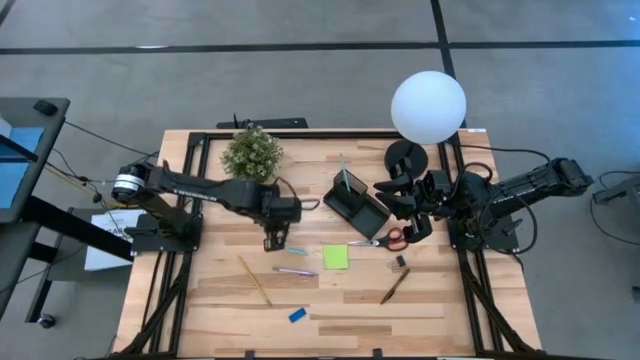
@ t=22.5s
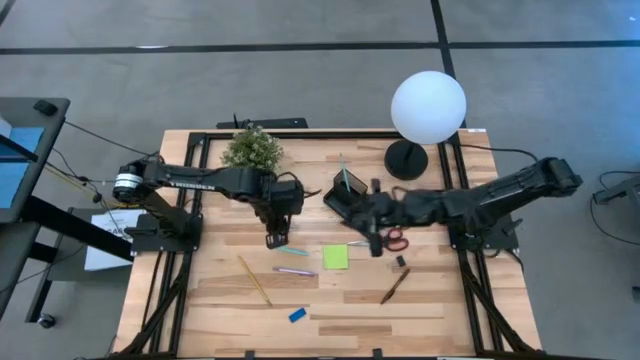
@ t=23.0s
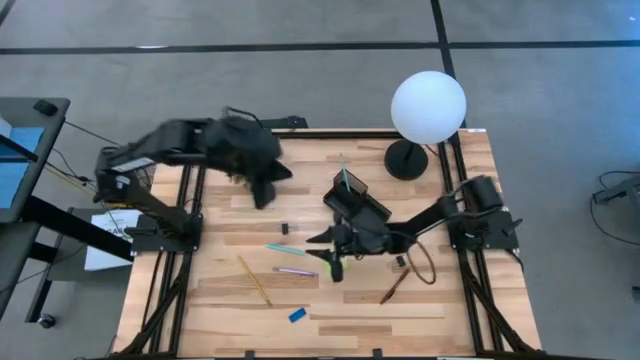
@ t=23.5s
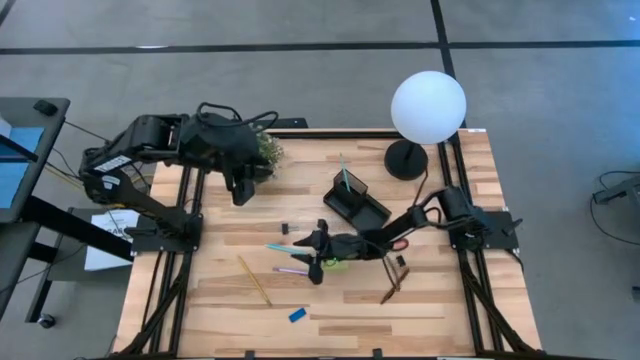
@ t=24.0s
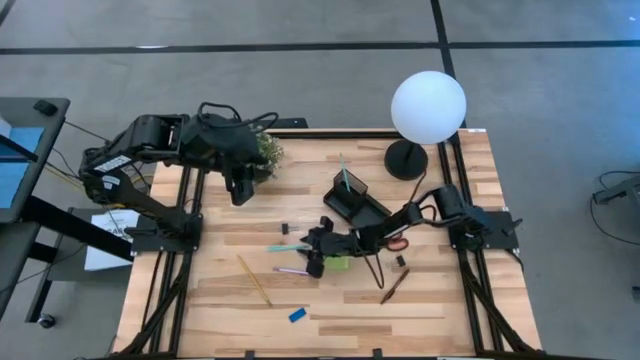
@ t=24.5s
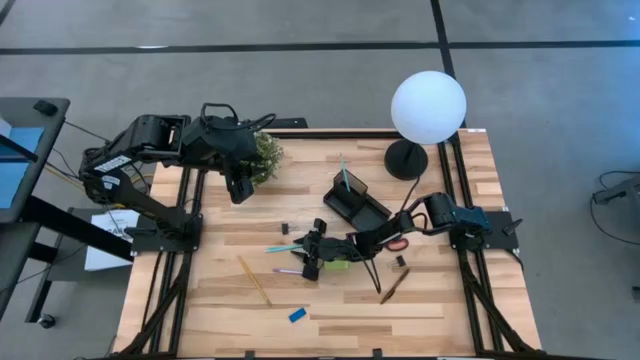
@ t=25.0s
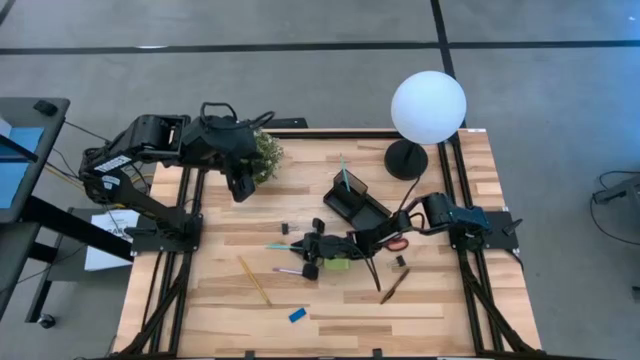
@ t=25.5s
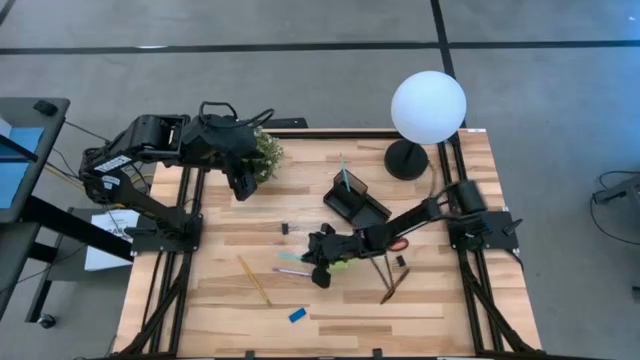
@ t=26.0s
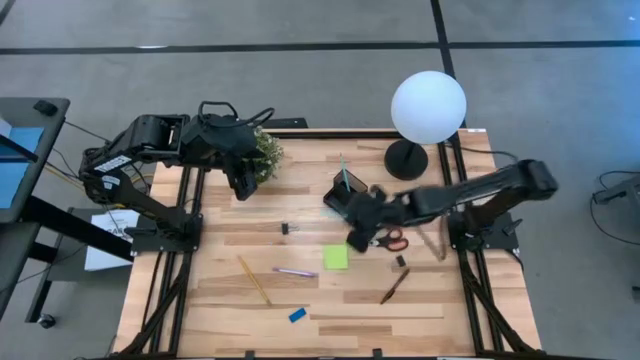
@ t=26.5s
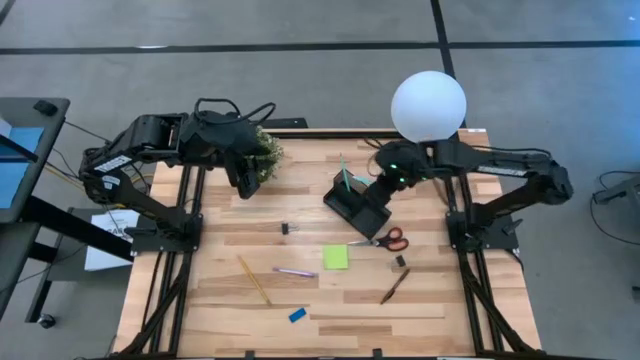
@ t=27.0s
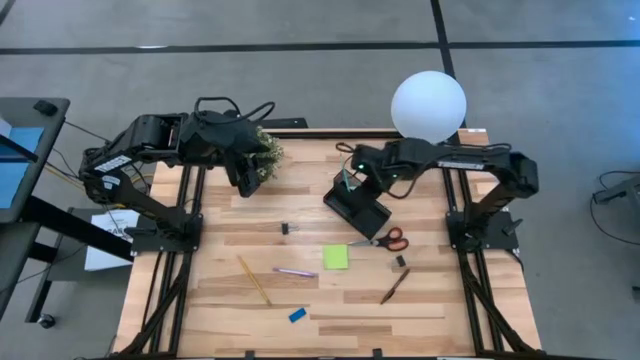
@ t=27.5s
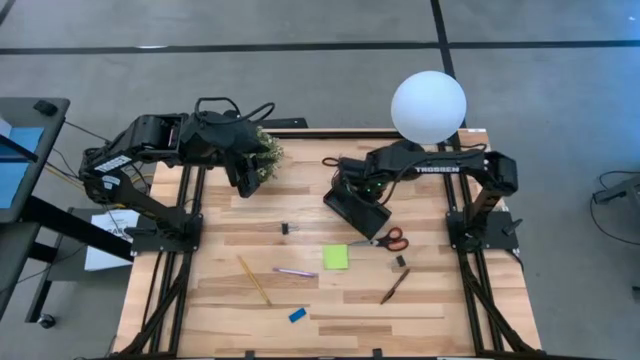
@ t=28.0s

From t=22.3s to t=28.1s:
Task: Pick and place office supplies into organizer
Put the blue pen into the black desk organizer

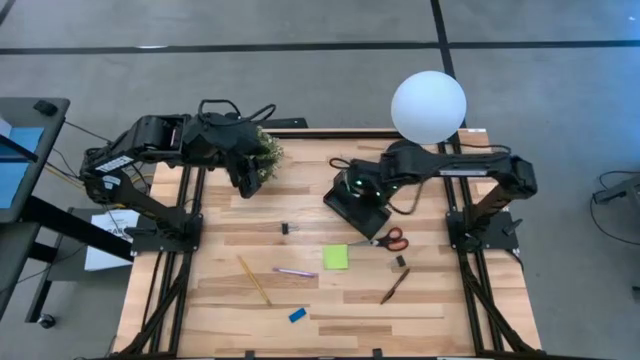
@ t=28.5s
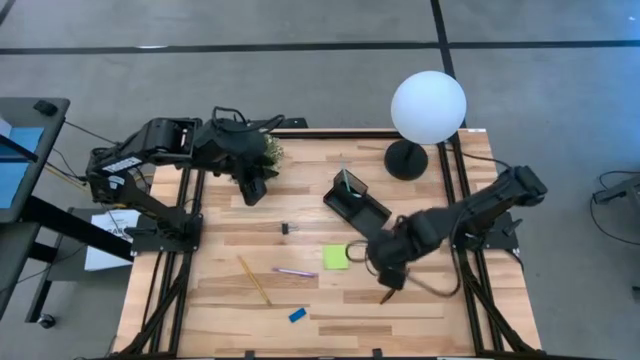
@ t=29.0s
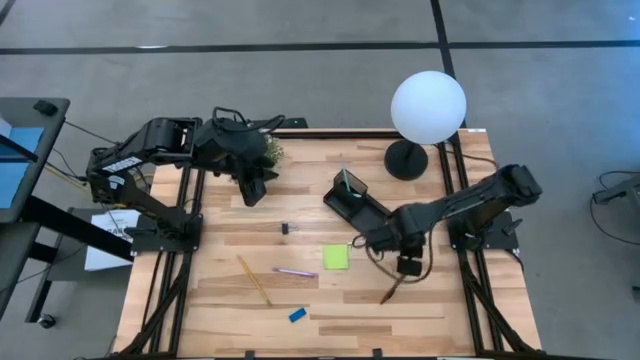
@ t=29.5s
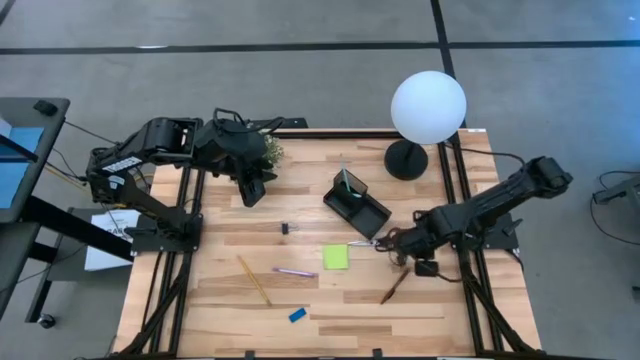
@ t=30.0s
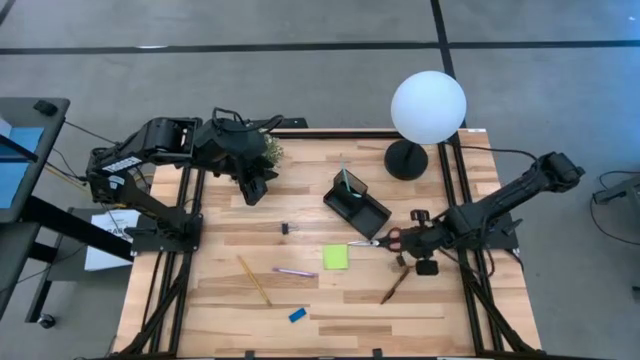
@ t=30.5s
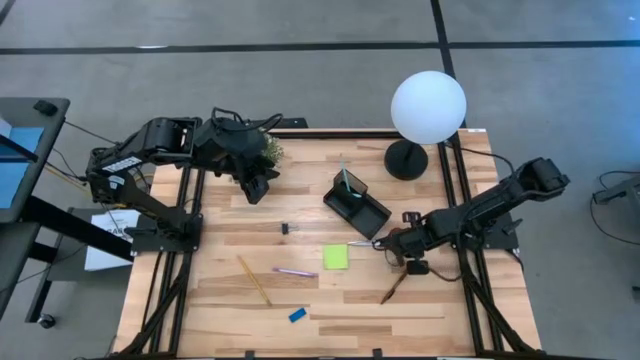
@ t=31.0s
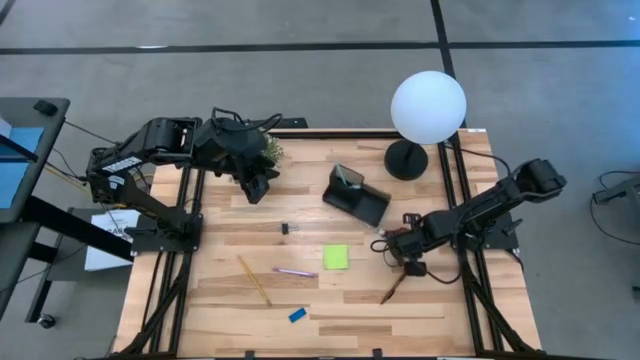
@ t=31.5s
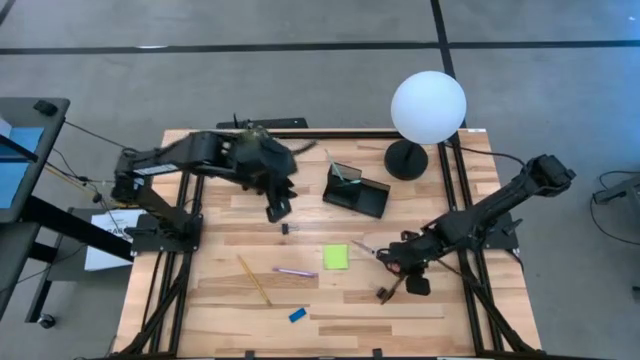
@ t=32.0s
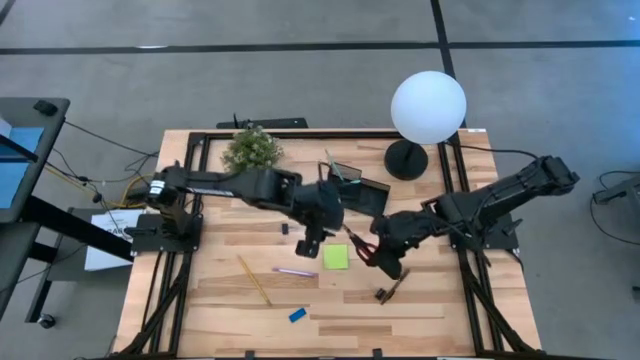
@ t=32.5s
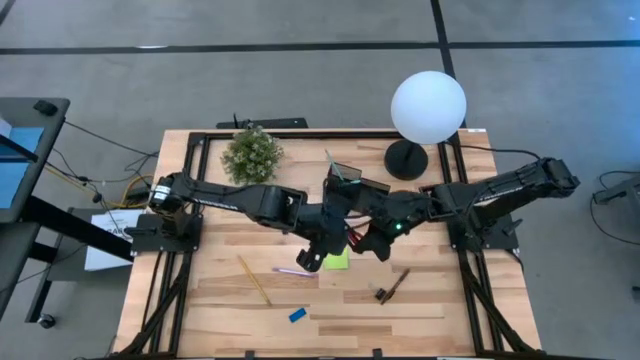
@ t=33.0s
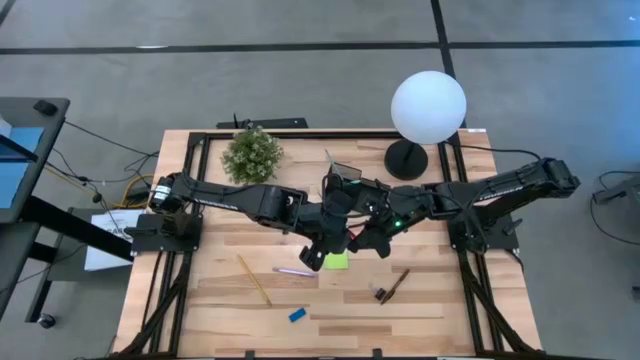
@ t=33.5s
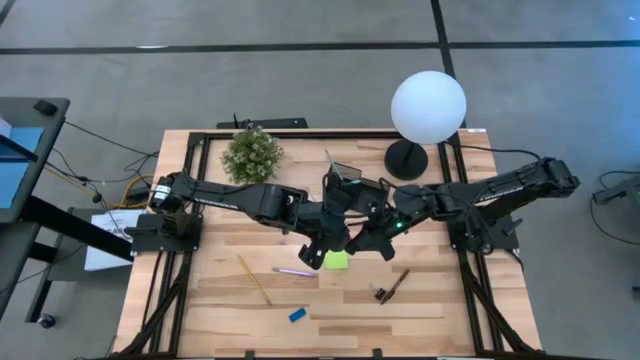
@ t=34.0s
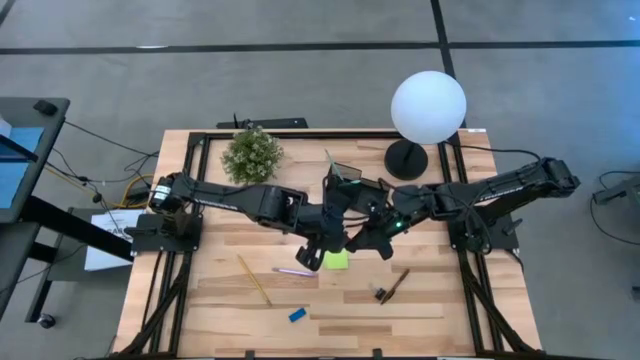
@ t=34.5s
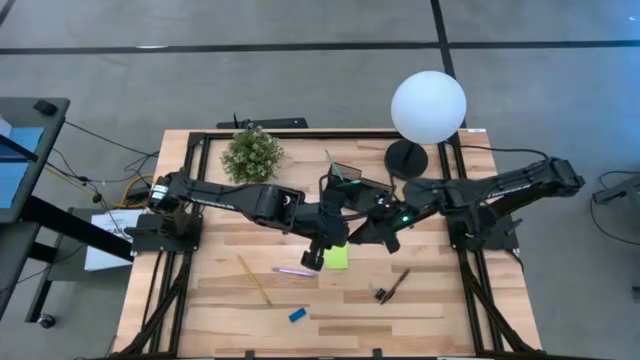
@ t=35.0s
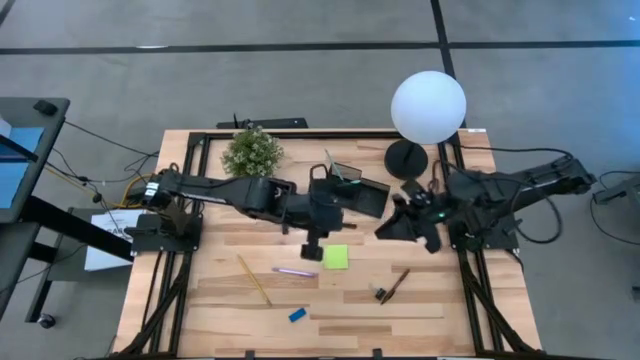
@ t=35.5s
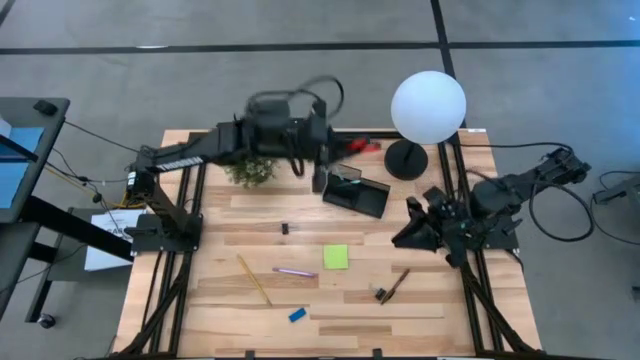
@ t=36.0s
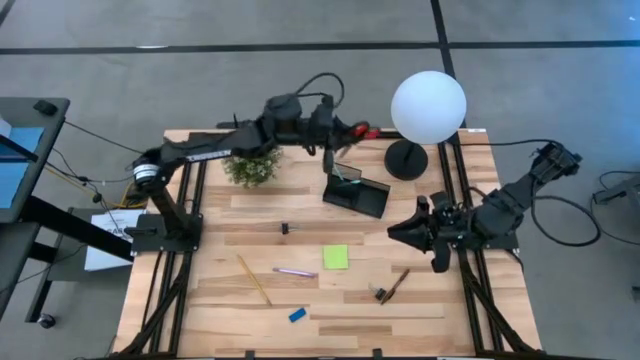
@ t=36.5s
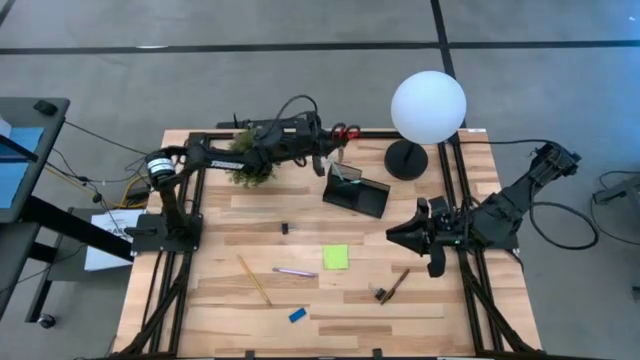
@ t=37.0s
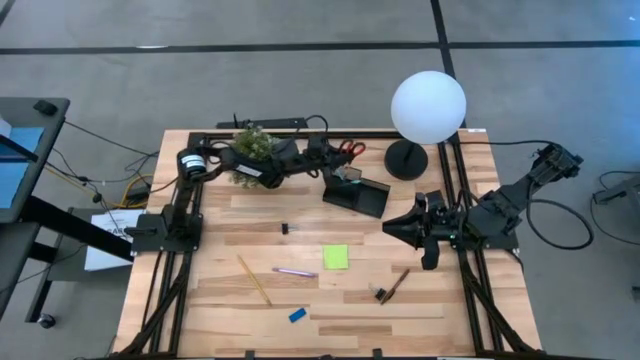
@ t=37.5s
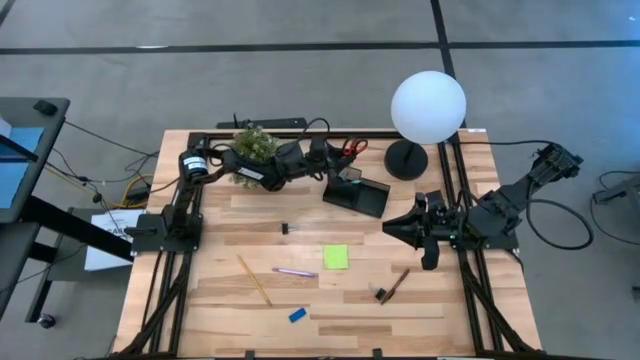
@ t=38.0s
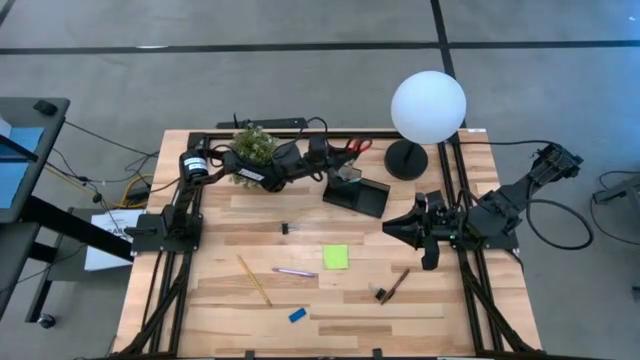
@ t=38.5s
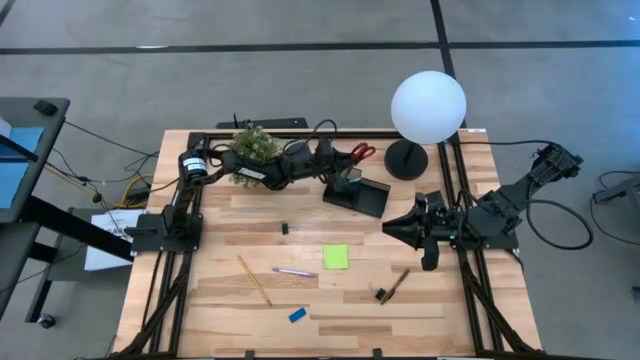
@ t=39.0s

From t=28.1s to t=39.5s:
Put the black scissors into the black desk organizer

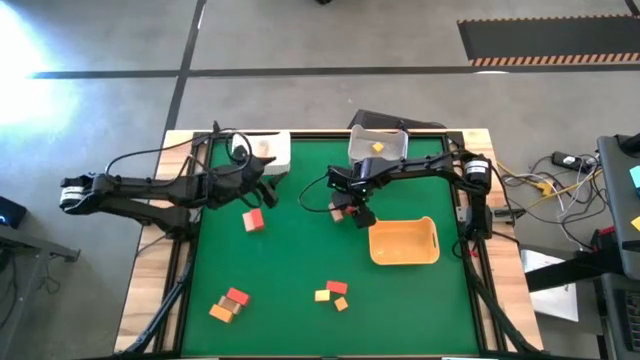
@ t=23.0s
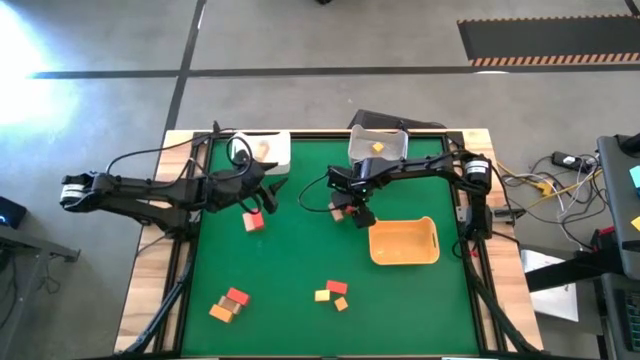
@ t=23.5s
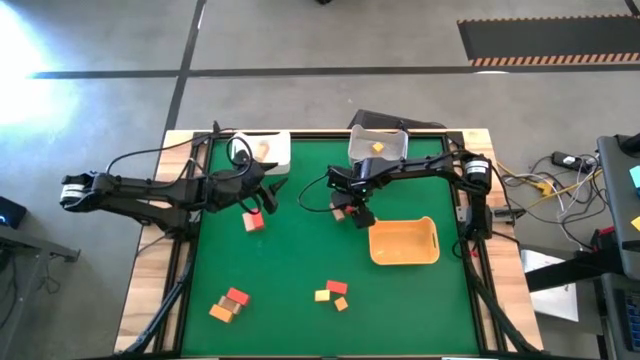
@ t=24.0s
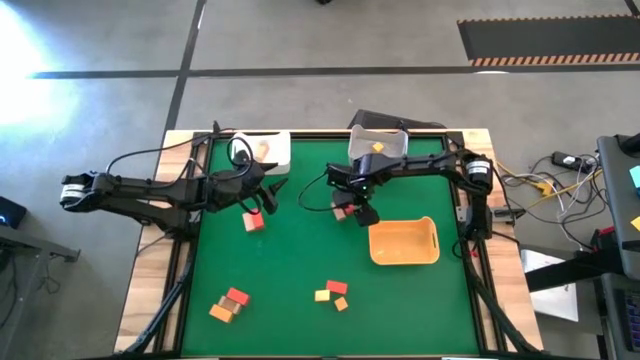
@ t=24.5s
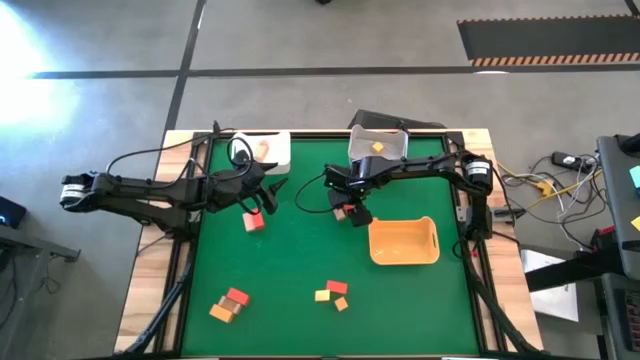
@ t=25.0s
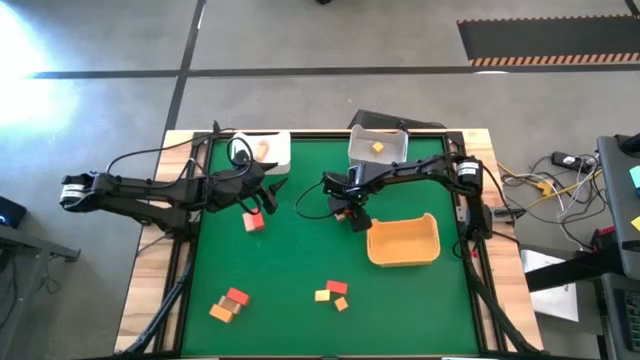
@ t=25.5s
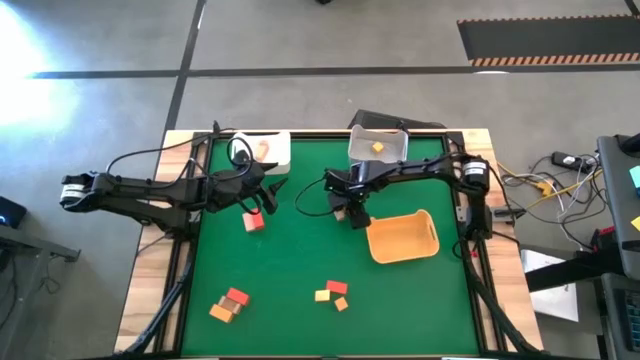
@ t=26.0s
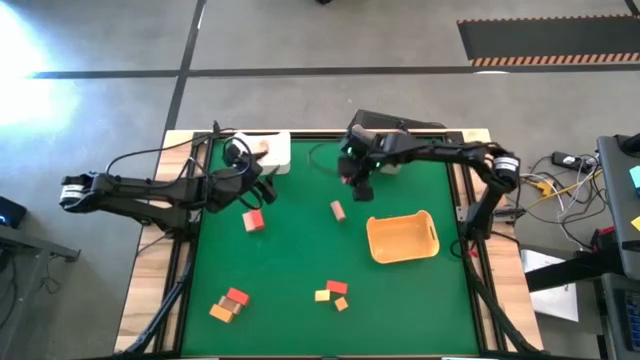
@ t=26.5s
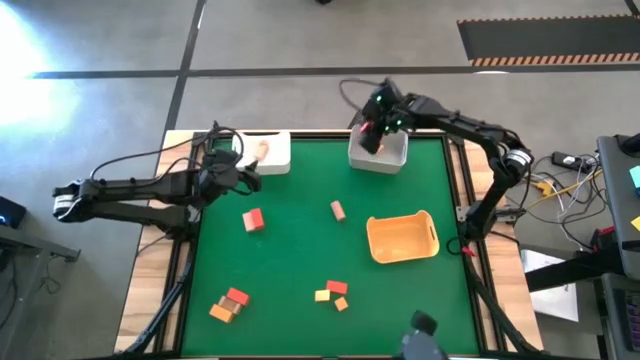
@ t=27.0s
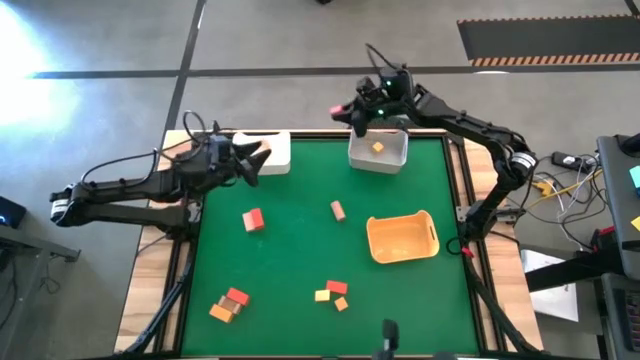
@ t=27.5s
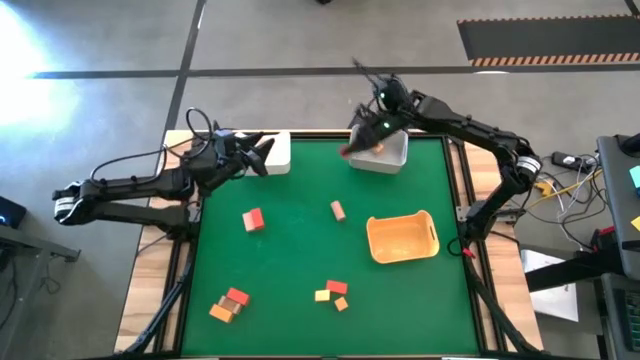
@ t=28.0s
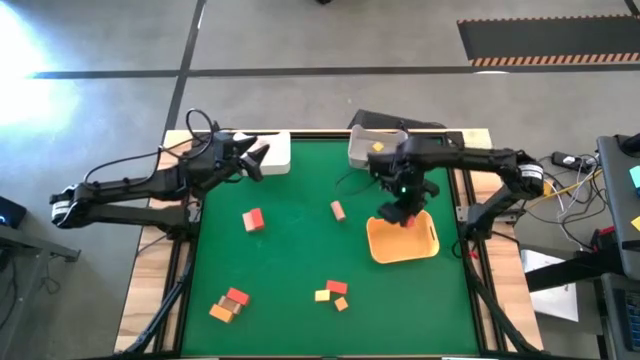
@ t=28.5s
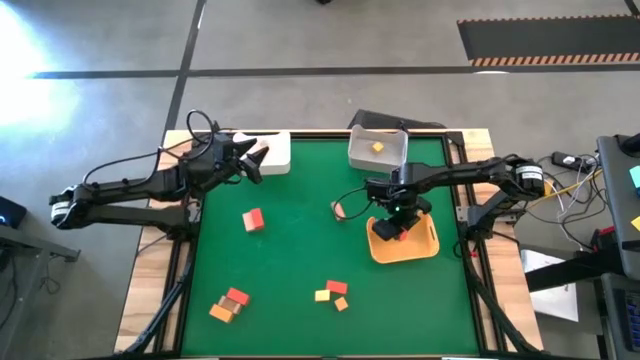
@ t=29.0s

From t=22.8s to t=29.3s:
Task: Sort & place blocks by color
Put the orange block into the yellow bin
